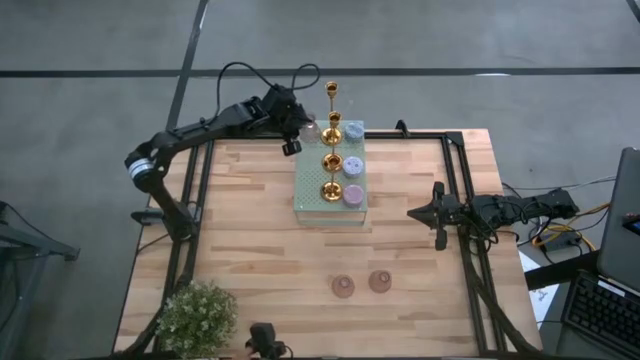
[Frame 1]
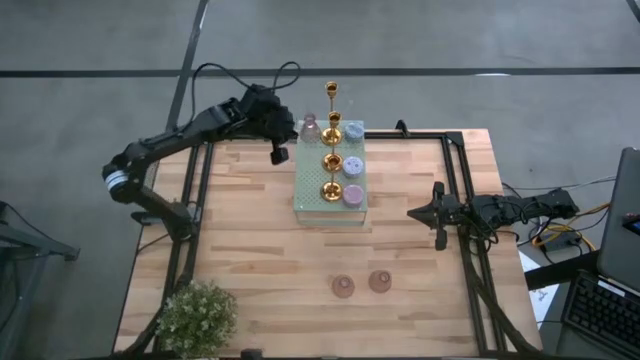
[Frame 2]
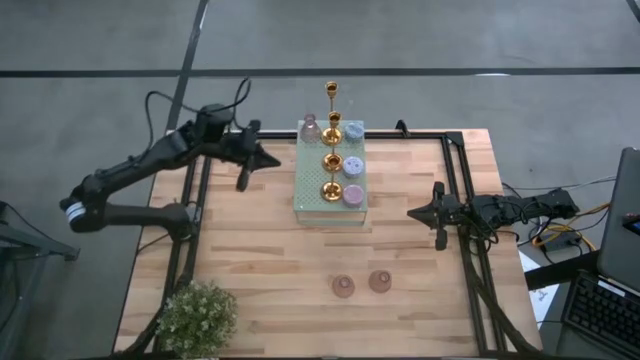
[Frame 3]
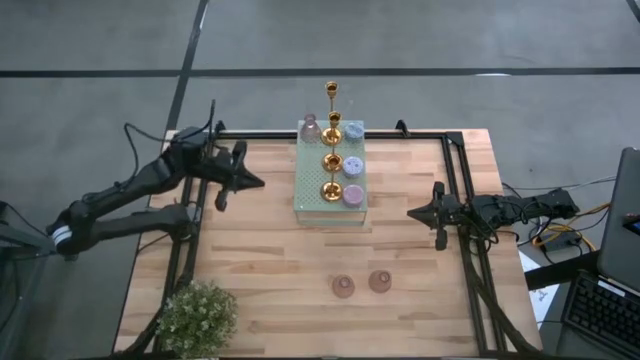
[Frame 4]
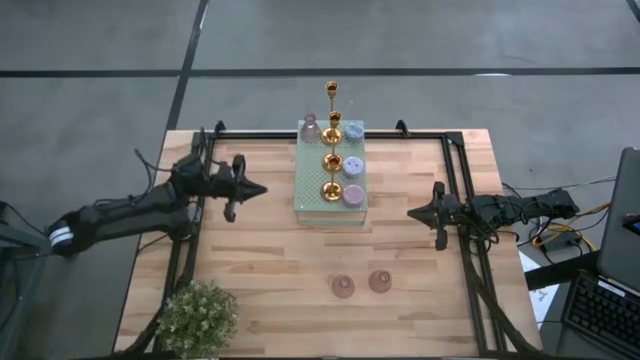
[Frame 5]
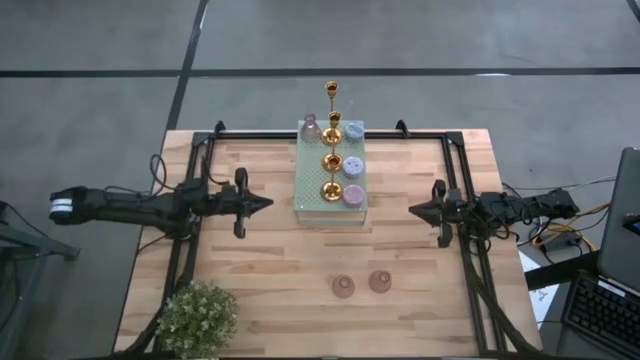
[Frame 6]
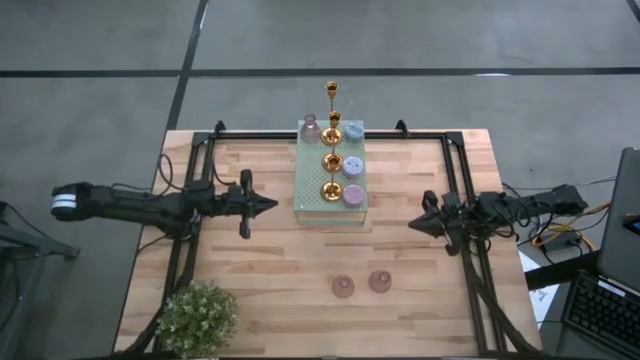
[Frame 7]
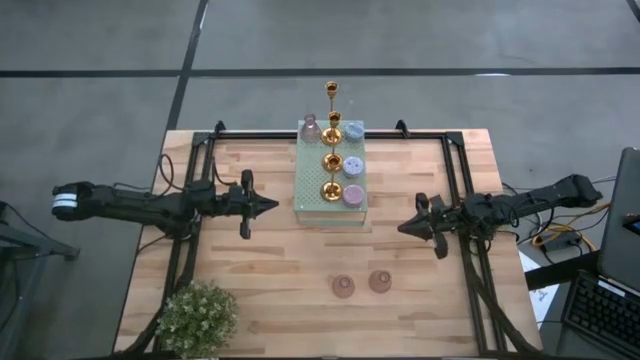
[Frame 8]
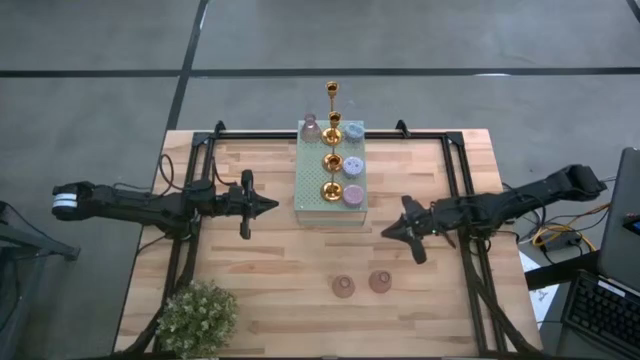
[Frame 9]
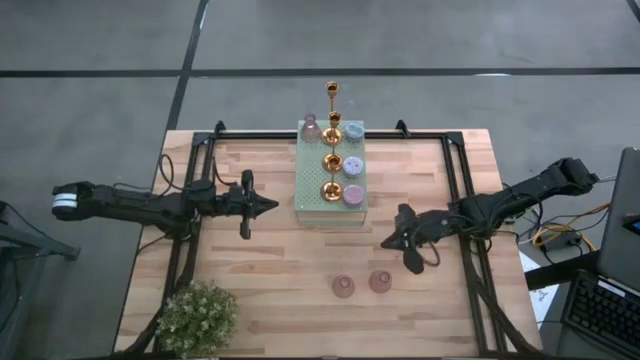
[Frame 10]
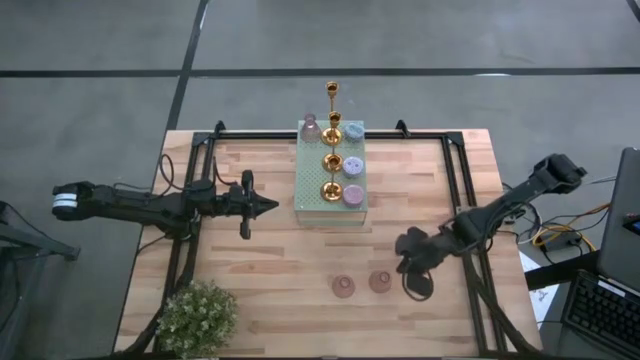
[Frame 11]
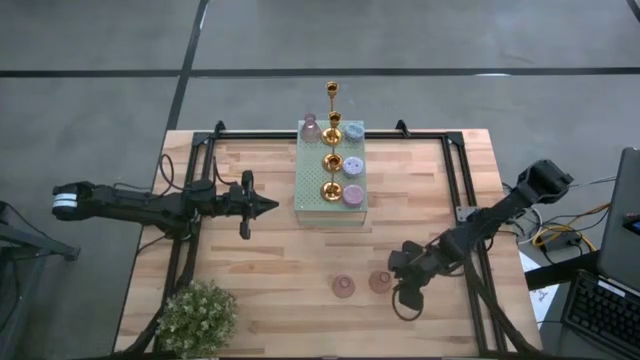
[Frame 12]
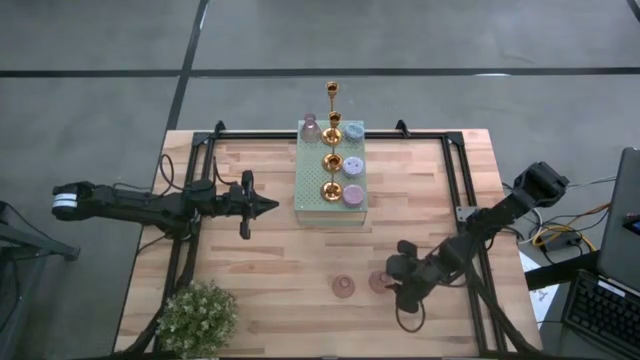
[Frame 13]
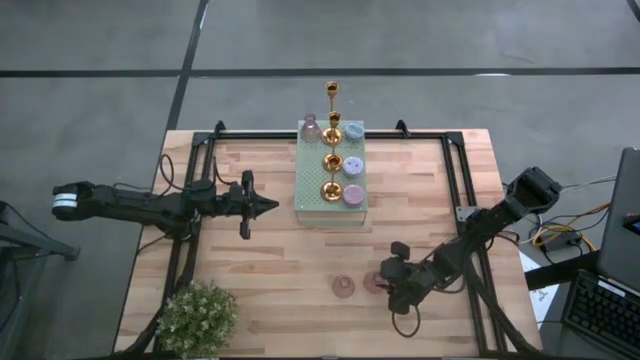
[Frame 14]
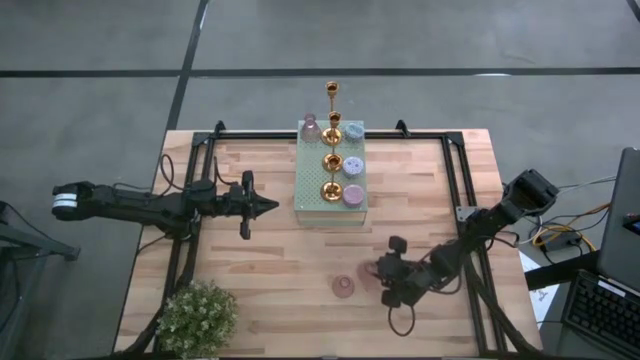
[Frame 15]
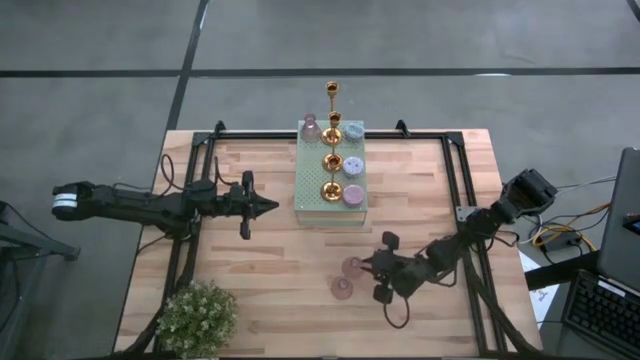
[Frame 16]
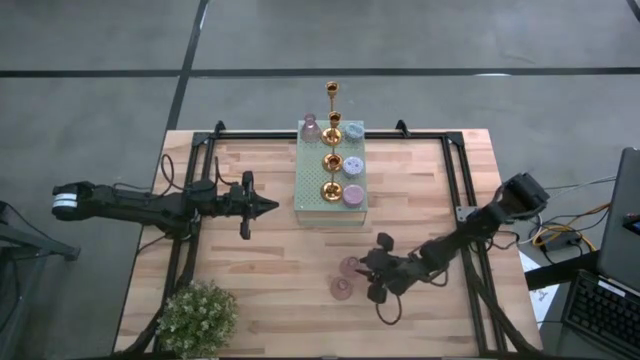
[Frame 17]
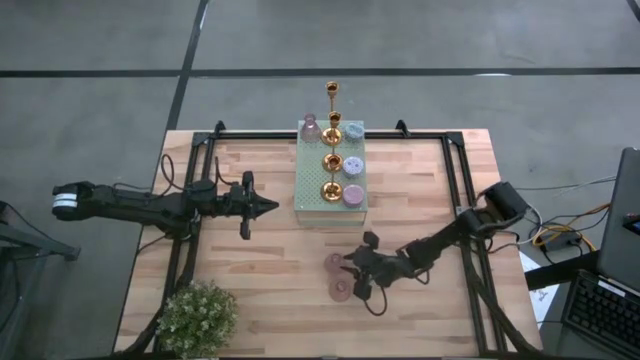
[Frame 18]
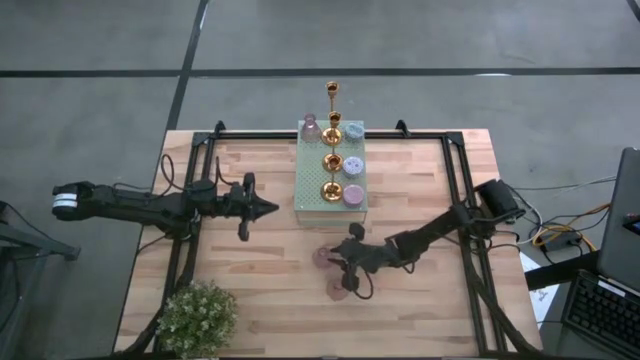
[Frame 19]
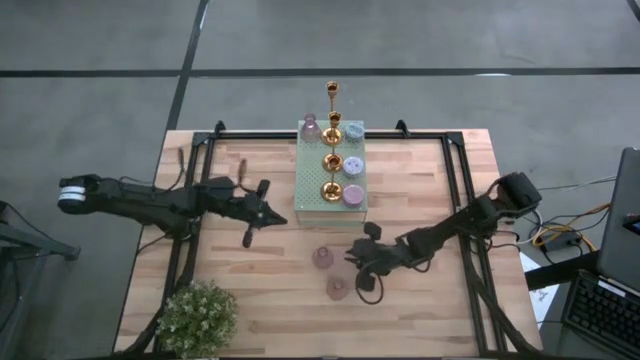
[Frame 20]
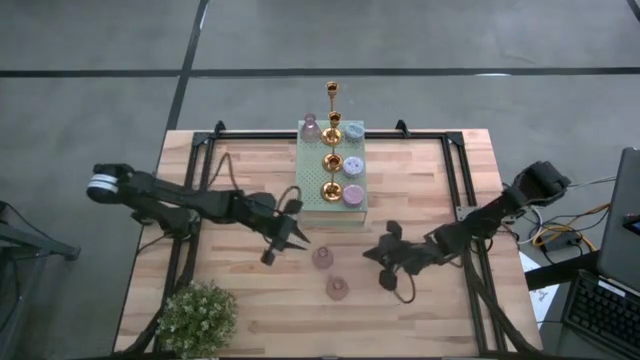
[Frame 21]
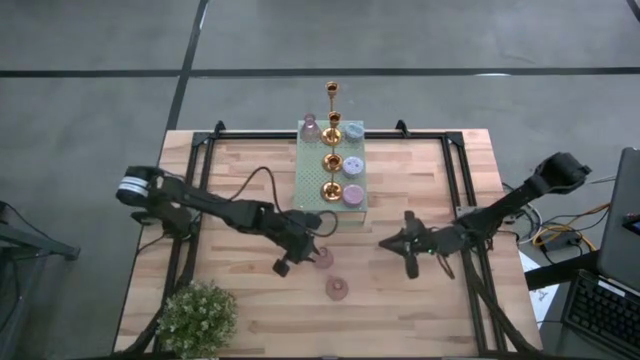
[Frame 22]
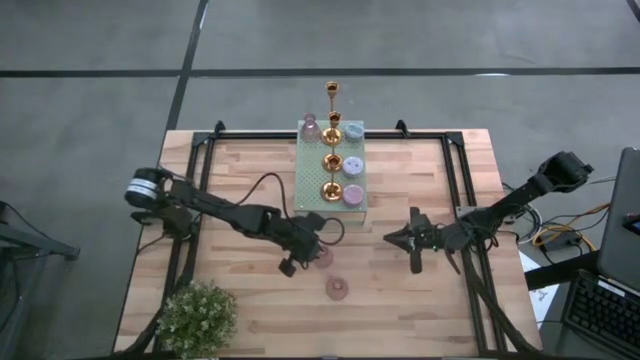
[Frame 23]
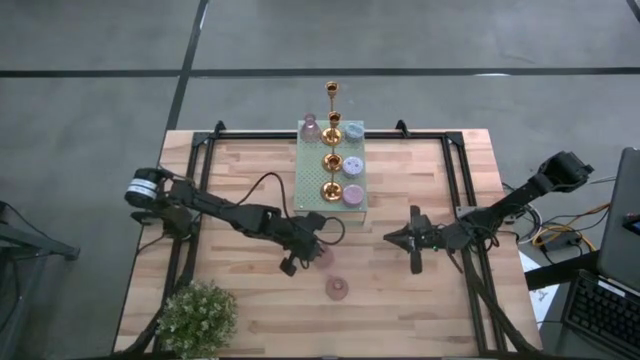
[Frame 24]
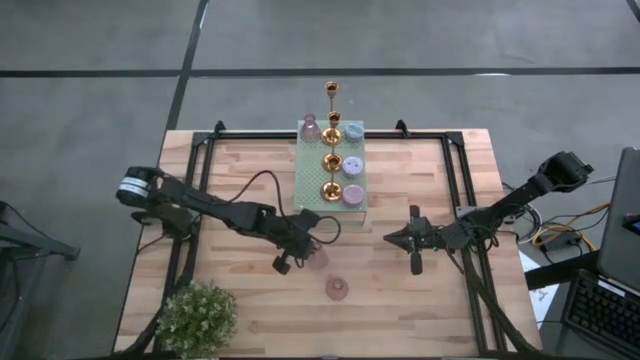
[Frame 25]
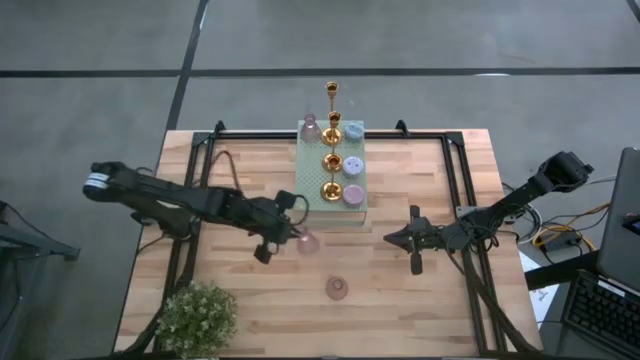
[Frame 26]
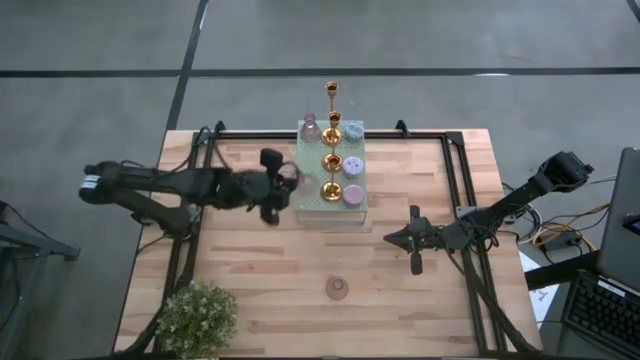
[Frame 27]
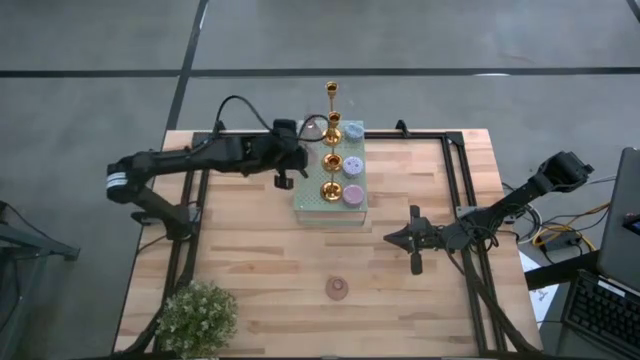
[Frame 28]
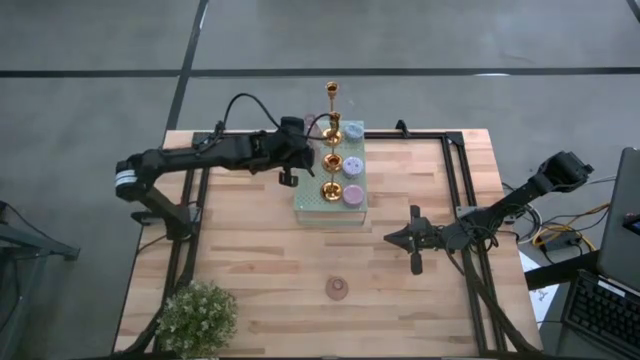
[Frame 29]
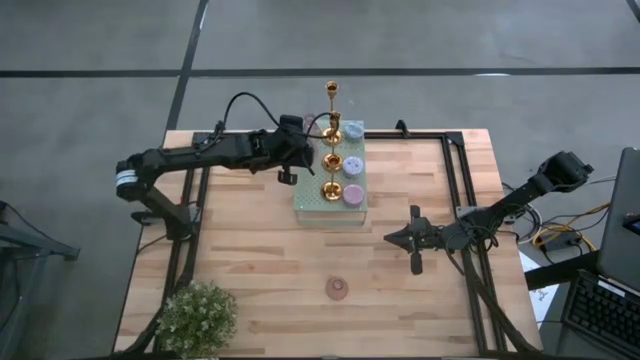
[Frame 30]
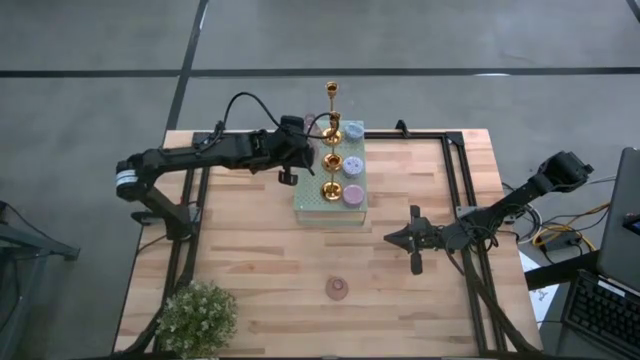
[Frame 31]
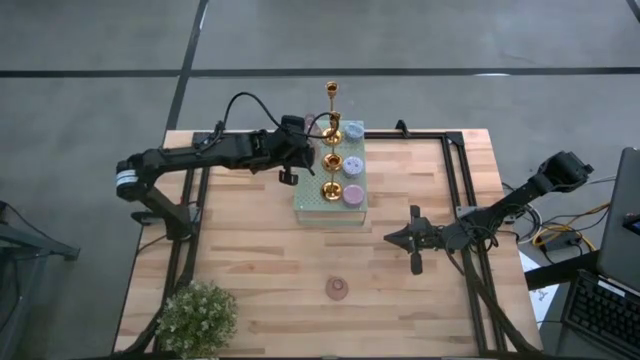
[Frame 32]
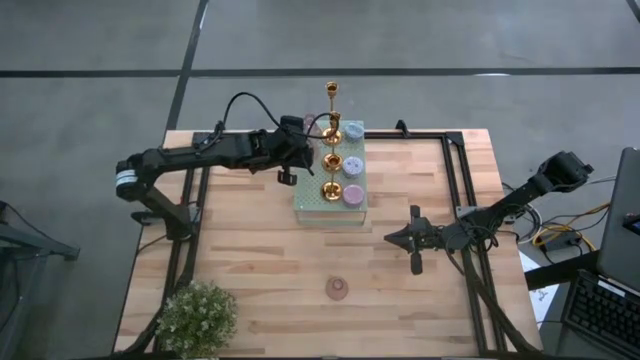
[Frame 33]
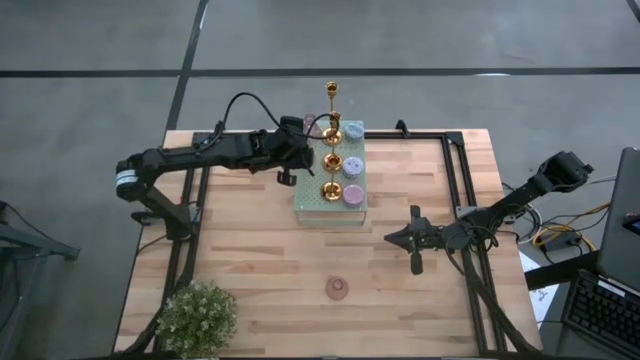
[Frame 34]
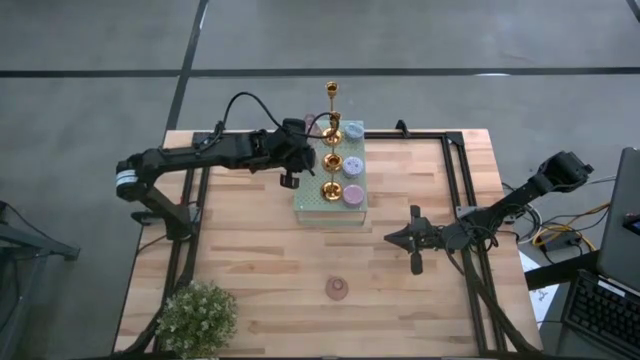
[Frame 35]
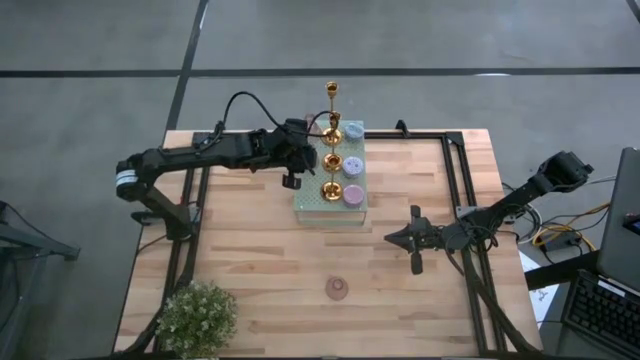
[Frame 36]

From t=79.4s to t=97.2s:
Task: Pick & Place candle stick holders
Put the right pink glass candle holder on the shelf aligned with the other pink glass candle holder

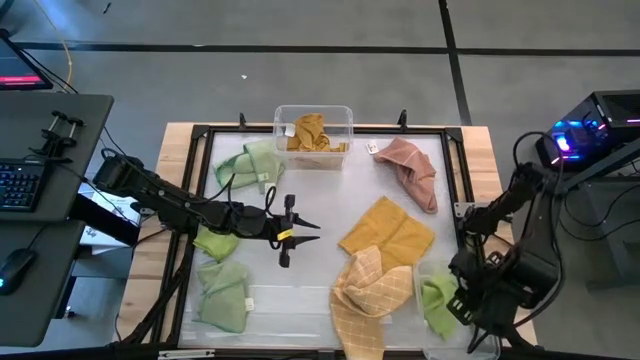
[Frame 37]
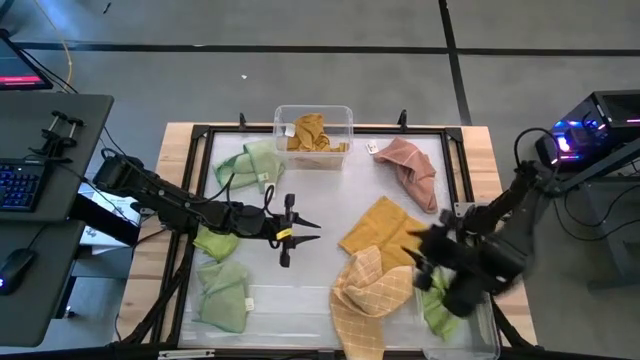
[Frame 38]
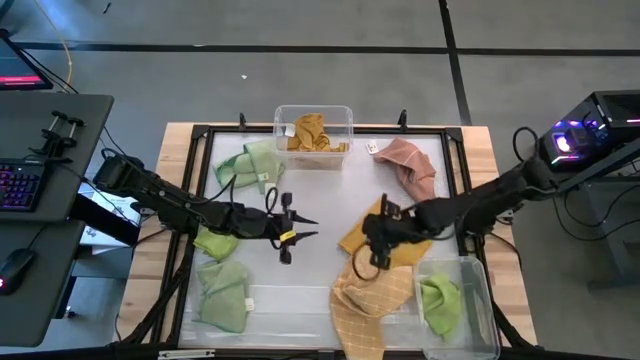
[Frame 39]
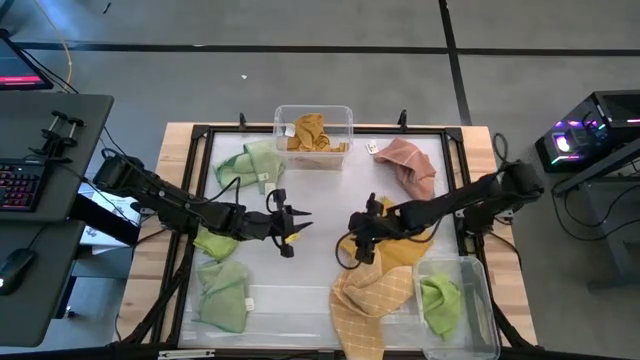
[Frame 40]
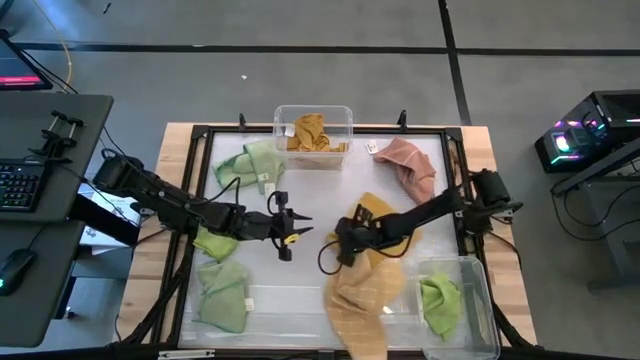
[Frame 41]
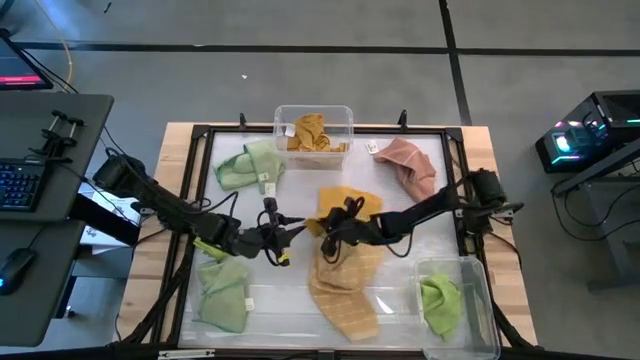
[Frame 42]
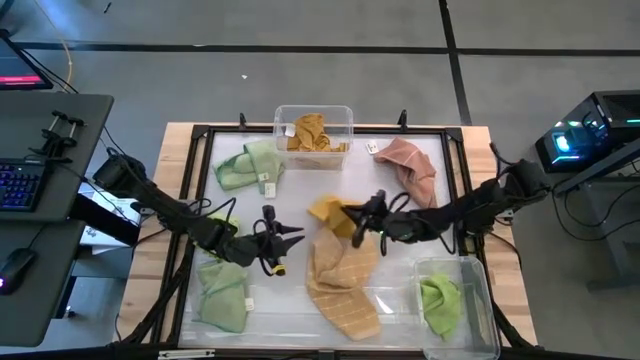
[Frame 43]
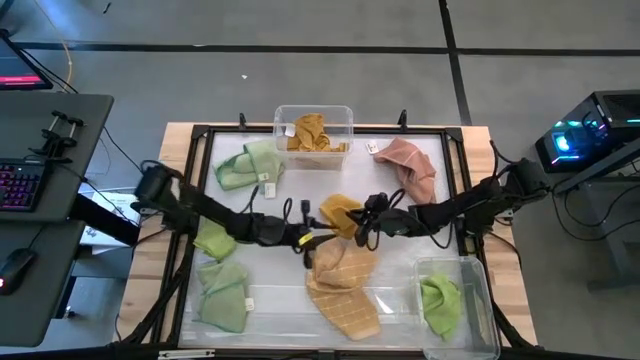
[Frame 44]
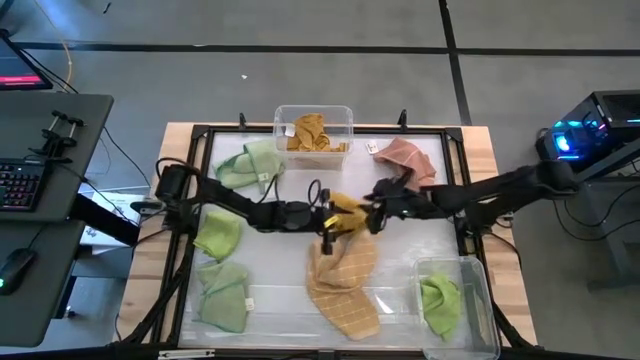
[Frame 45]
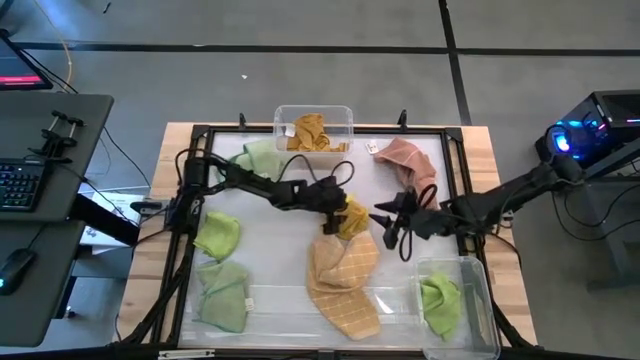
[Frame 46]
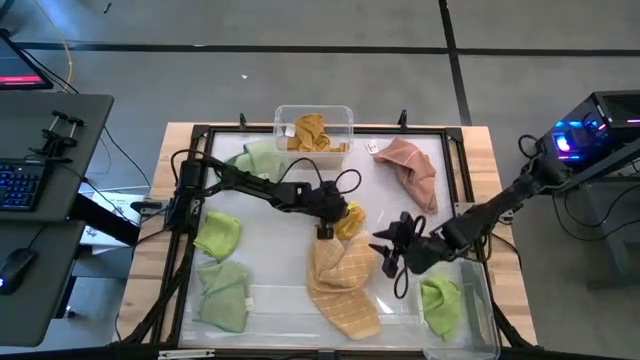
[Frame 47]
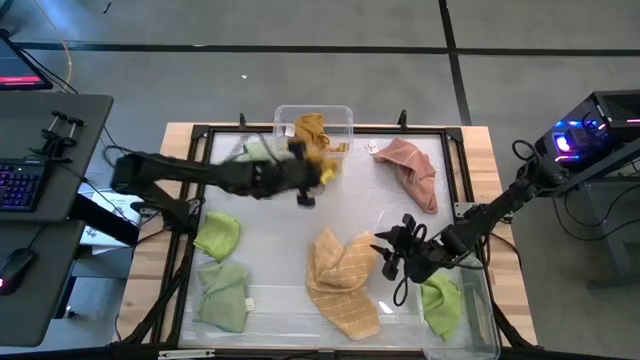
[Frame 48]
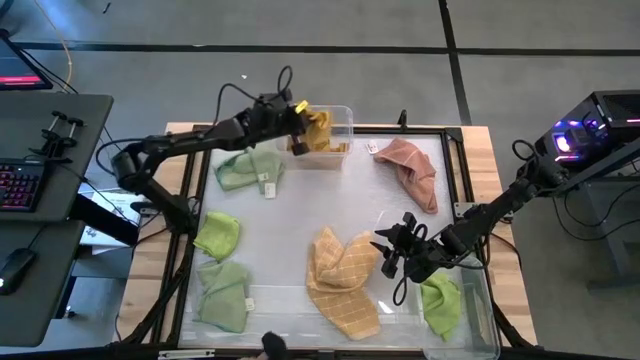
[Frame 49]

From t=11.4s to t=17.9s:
Task: Sort towels by color in basket
Put the yellow towel into the top transparent bin
